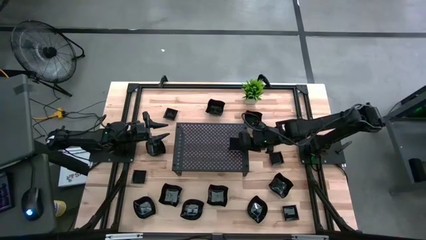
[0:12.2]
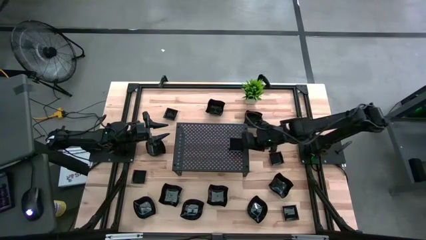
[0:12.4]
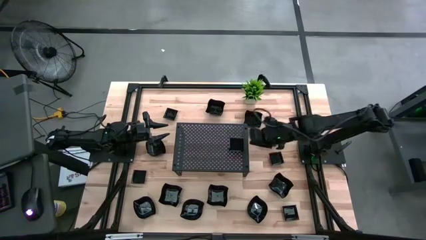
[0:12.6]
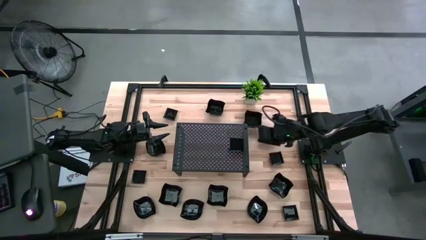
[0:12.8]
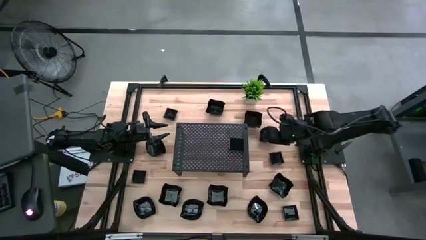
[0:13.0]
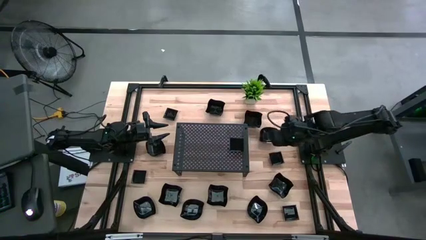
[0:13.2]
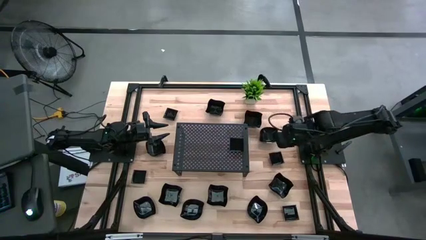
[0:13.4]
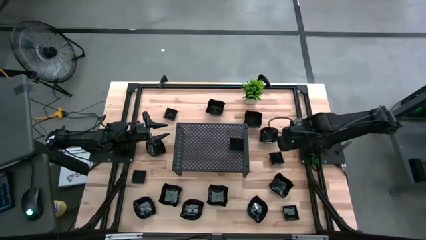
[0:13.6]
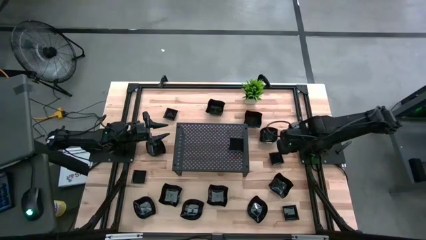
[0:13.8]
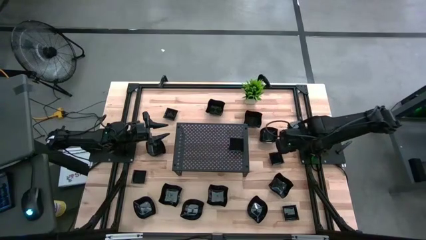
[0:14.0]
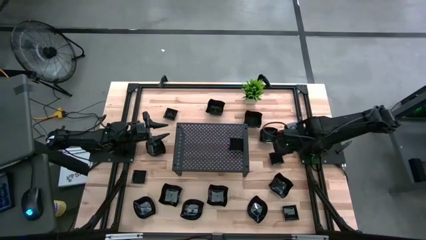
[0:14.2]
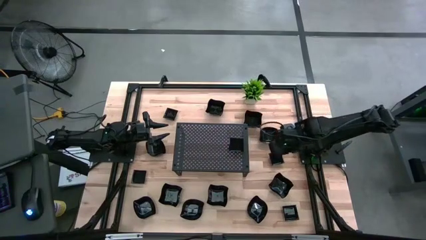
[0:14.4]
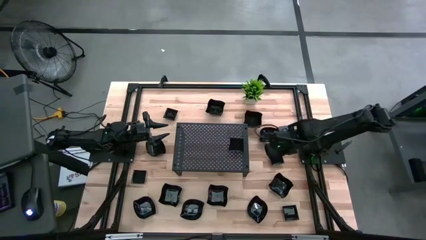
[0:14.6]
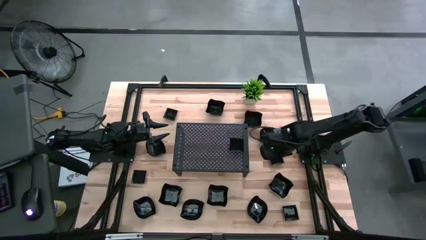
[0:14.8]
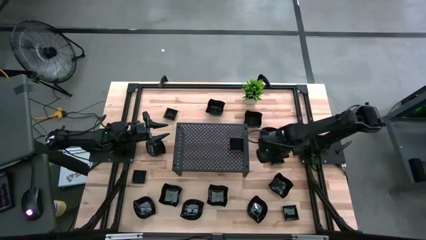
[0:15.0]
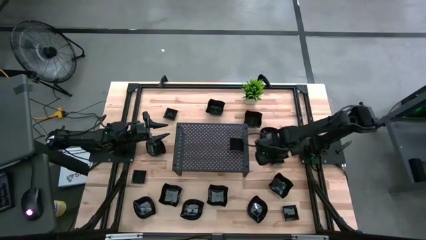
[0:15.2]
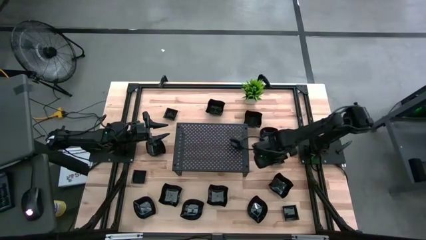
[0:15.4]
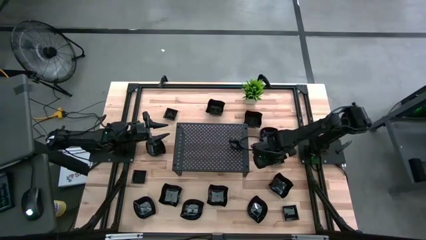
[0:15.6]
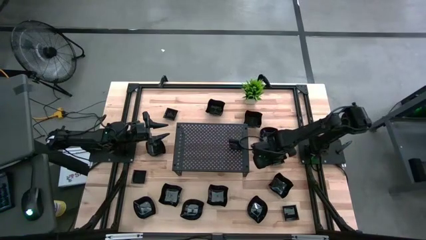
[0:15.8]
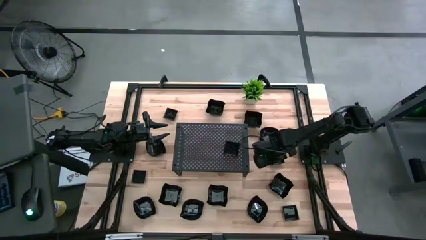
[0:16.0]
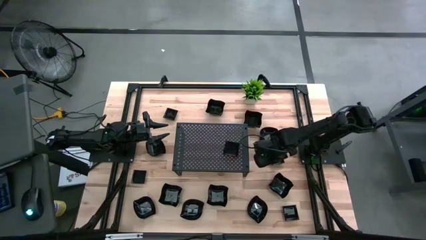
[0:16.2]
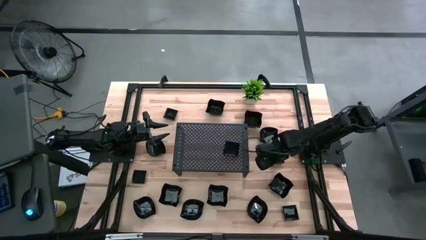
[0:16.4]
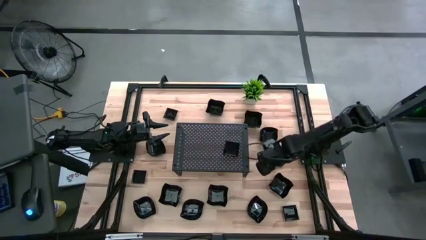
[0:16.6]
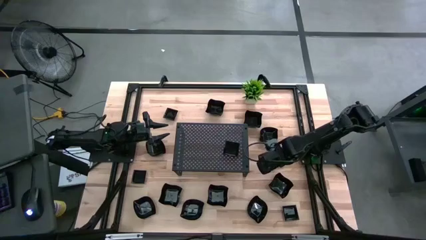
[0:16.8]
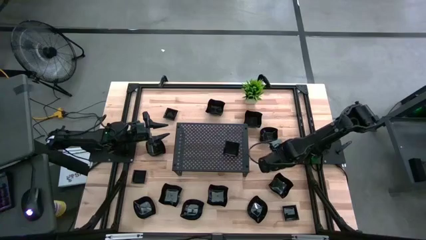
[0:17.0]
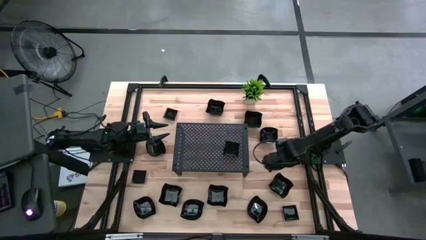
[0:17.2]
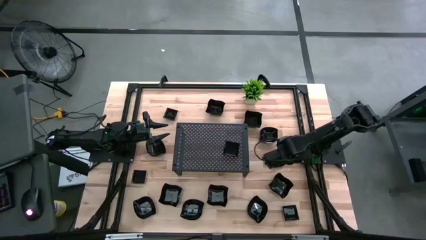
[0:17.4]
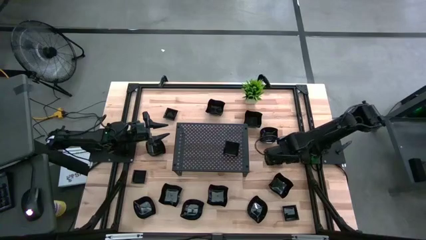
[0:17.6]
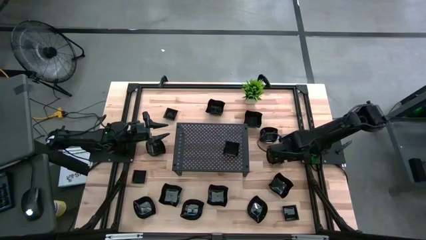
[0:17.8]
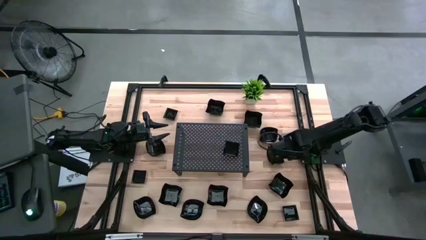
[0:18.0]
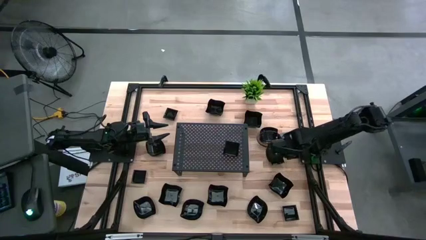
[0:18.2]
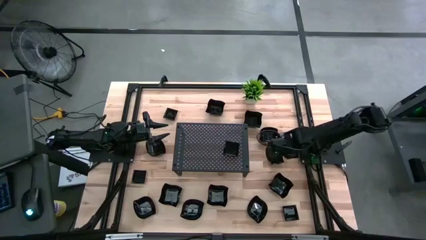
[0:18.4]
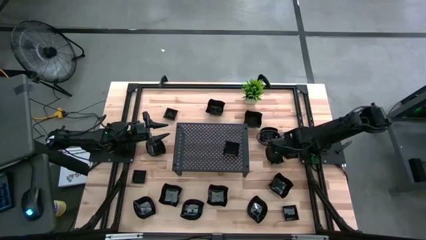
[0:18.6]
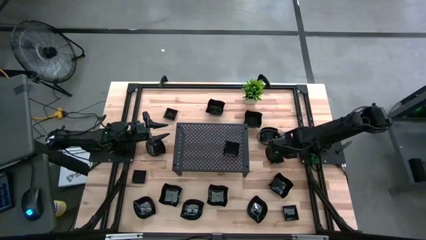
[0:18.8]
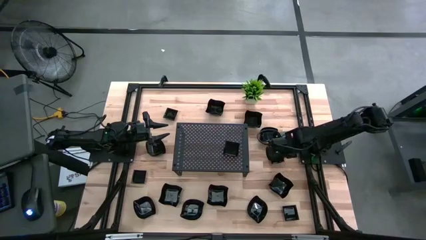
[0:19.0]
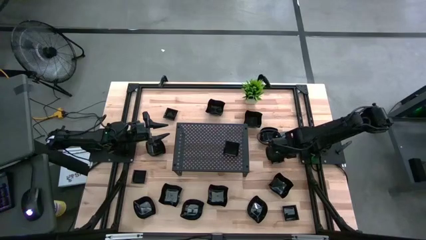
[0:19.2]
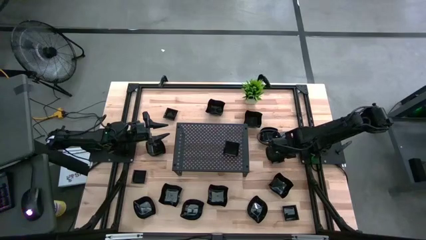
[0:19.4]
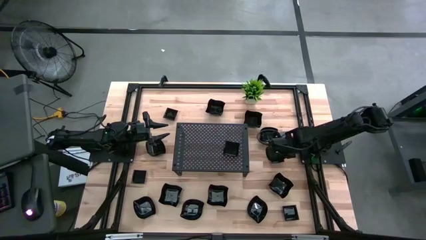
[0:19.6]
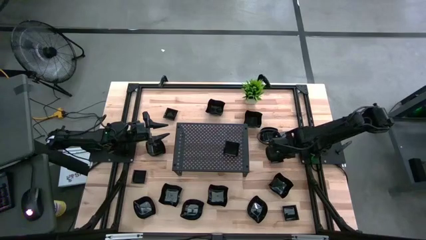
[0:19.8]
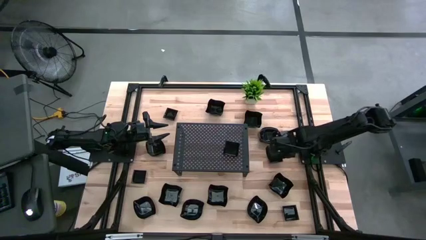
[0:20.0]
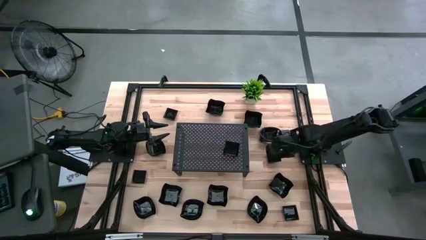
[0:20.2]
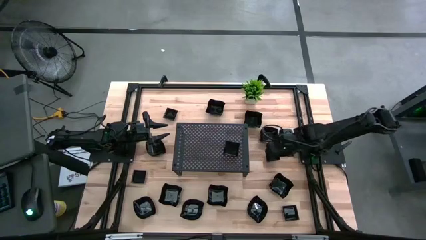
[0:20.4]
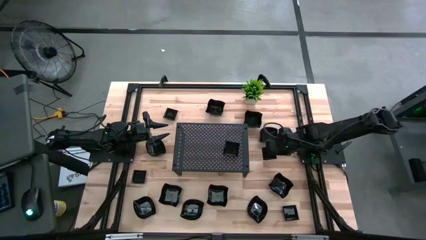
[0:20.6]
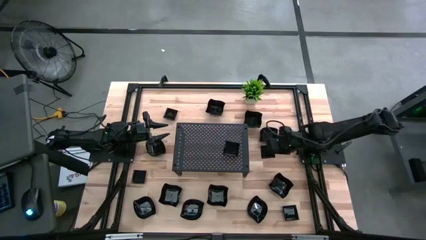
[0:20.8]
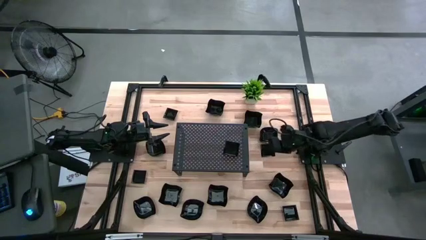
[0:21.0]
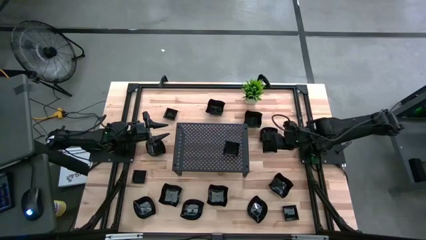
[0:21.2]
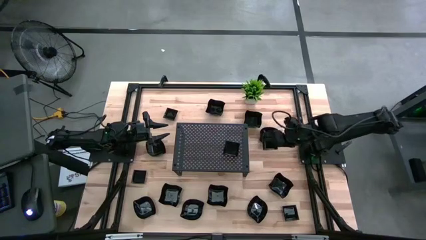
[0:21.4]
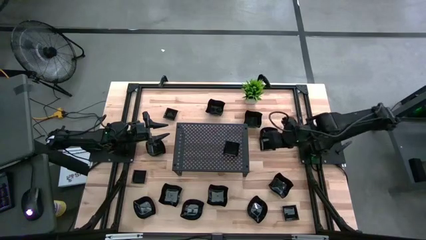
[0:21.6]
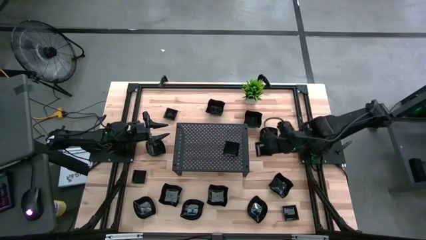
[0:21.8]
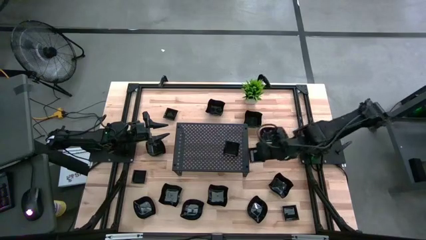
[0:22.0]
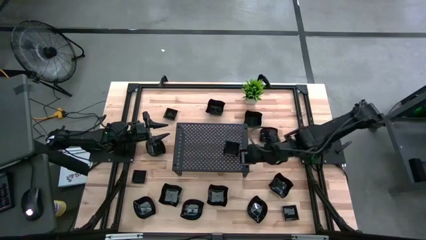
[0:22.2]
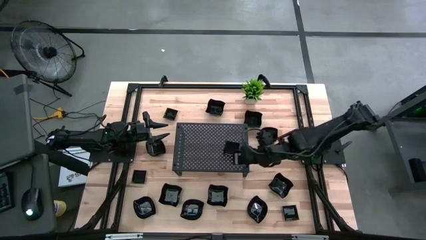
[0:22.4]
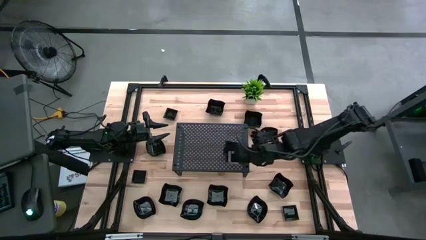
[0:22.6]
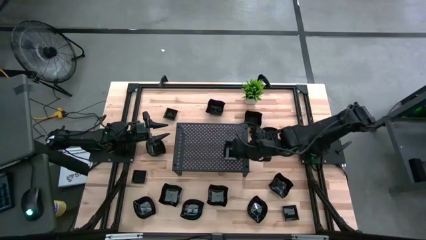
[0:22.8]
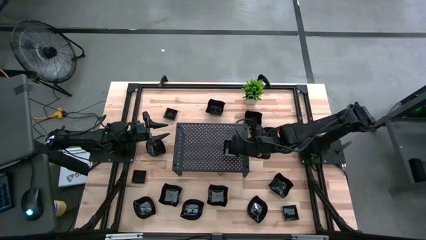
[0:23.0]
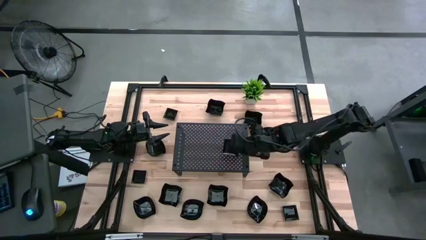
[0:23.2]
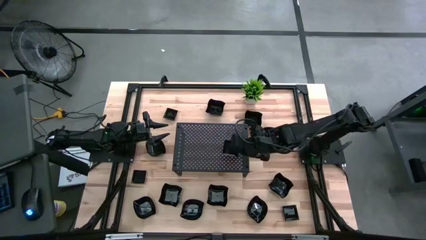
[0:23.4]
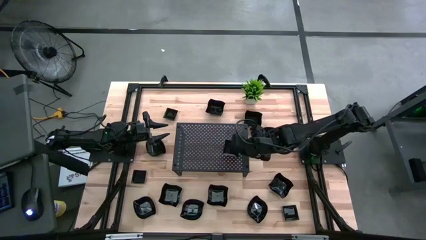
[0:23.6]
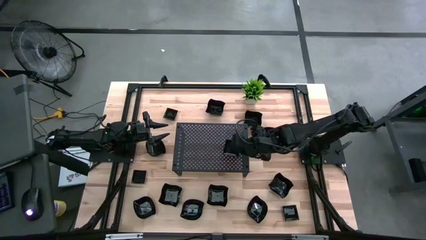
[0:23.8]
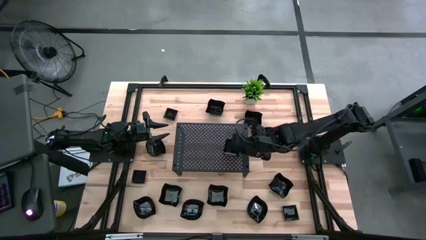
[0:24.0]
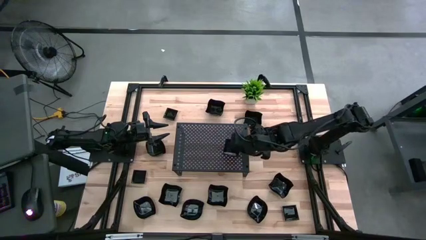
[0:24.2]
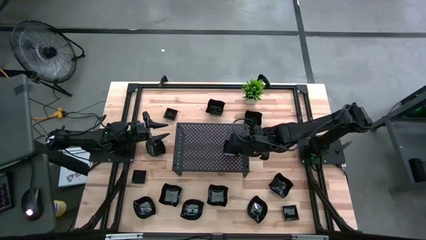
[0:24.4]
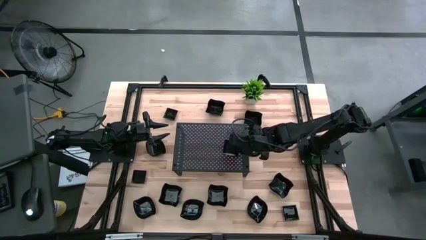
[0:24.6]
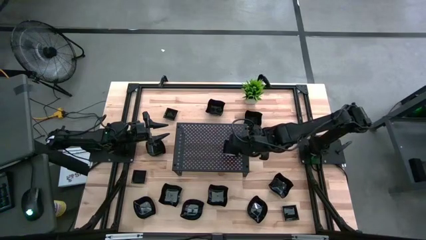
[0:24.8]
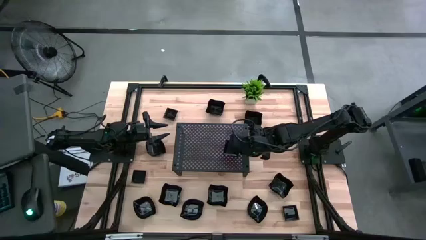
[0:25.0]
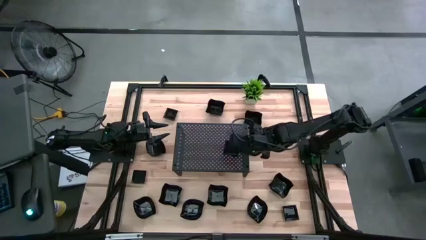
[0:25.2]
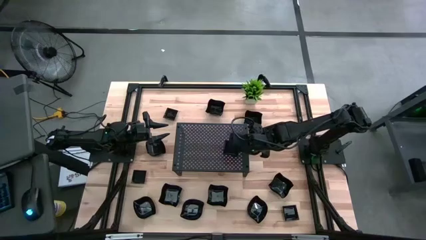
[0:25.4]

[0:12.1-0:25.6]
Task: Pick & Place Mini shaped plates
Stack the square plate on top of the square plate on the shelf
